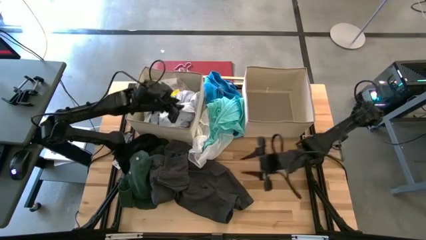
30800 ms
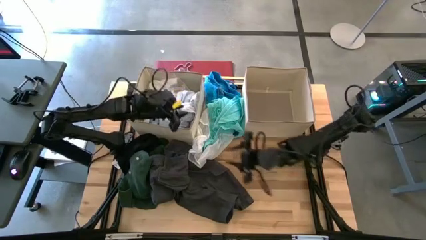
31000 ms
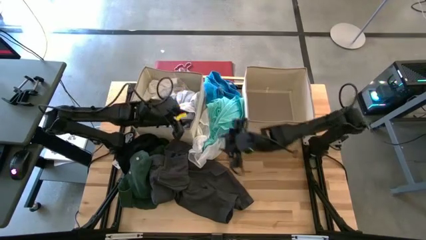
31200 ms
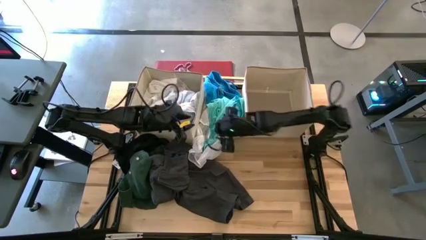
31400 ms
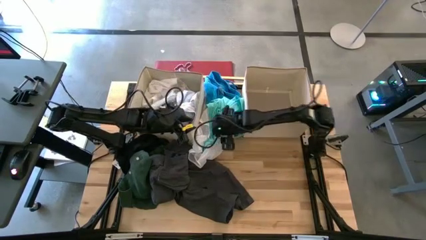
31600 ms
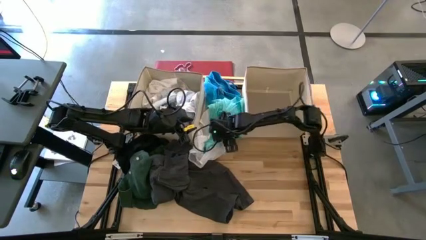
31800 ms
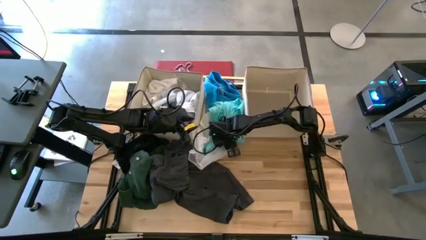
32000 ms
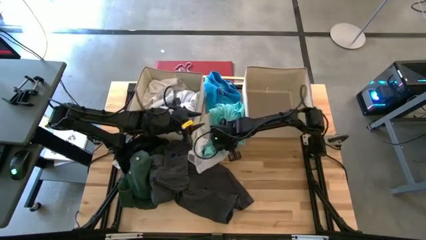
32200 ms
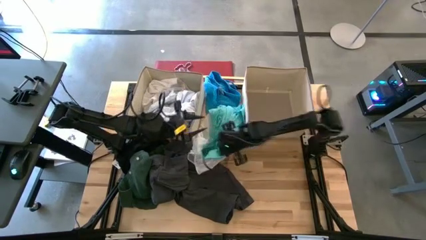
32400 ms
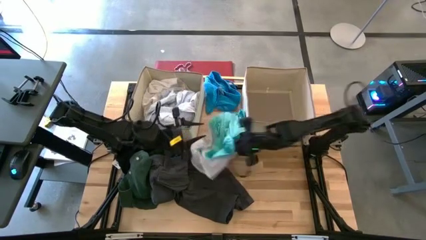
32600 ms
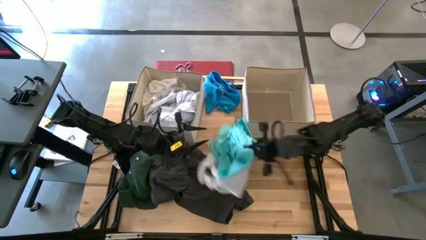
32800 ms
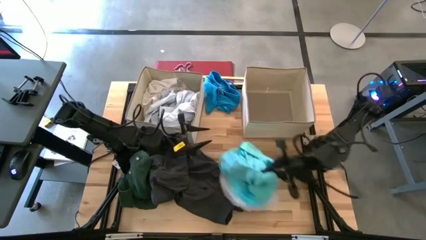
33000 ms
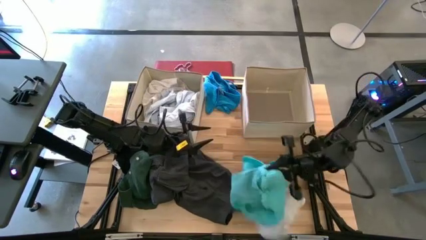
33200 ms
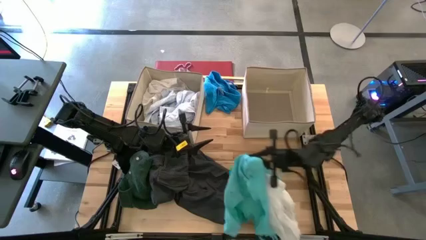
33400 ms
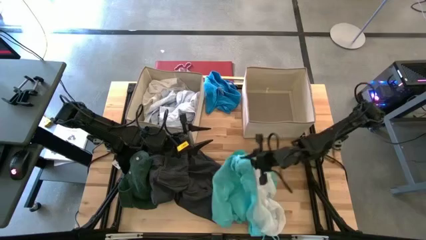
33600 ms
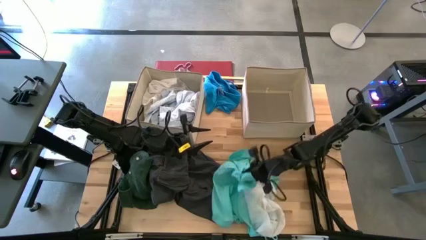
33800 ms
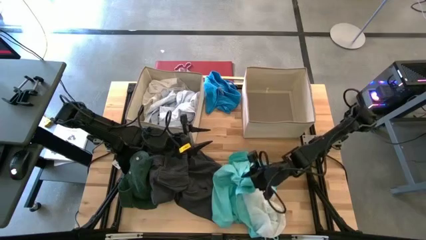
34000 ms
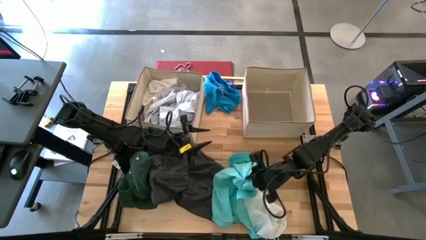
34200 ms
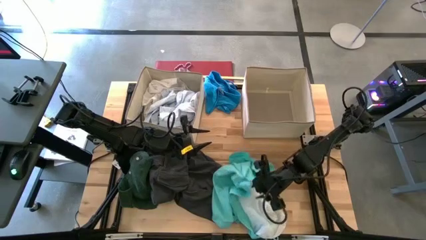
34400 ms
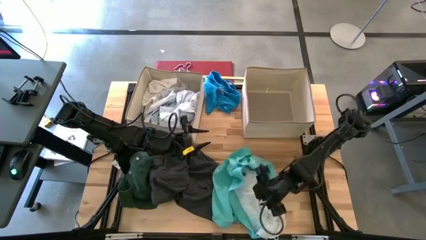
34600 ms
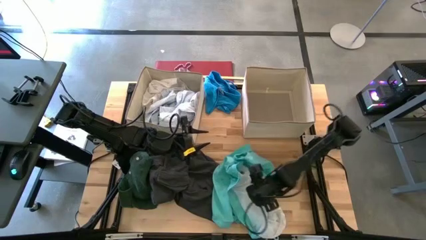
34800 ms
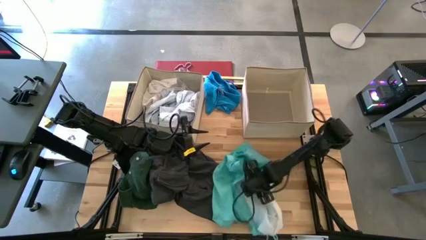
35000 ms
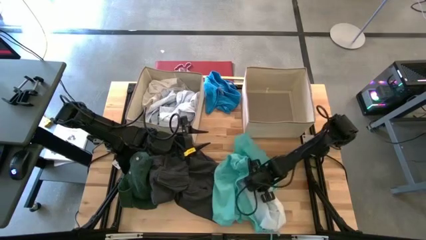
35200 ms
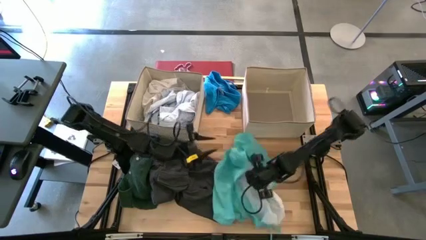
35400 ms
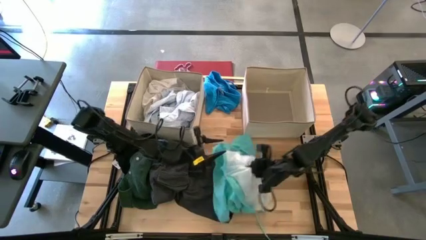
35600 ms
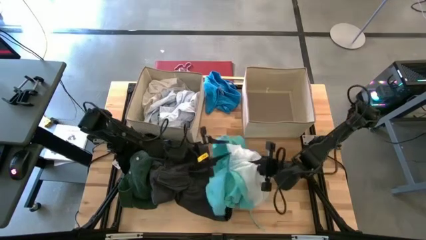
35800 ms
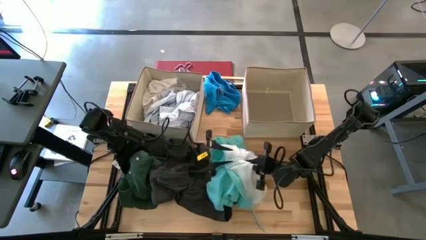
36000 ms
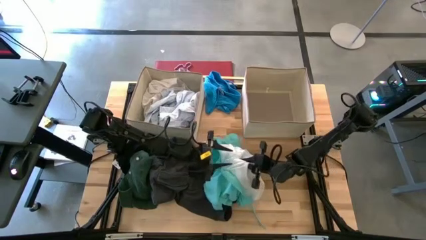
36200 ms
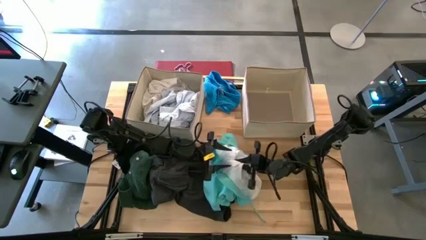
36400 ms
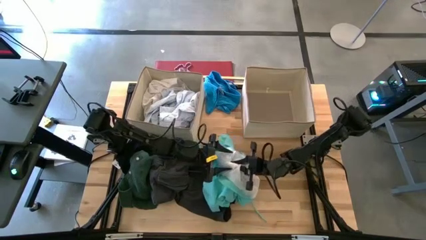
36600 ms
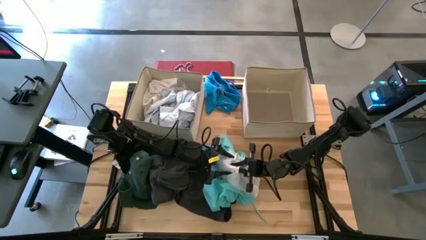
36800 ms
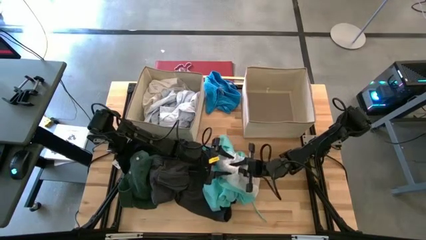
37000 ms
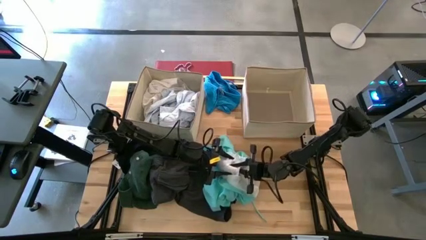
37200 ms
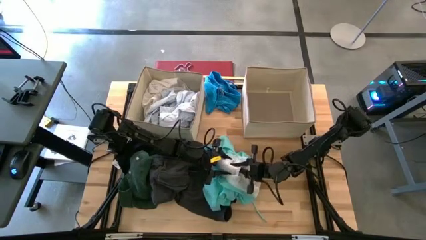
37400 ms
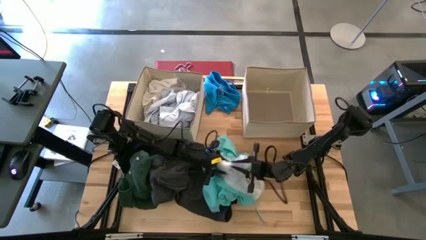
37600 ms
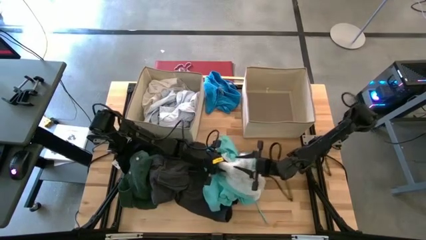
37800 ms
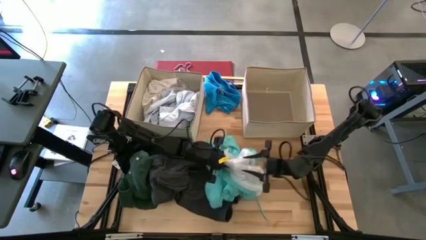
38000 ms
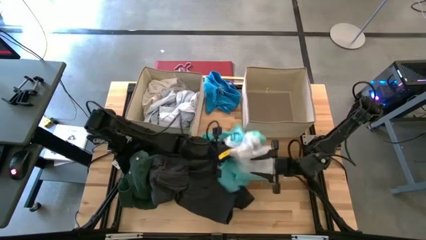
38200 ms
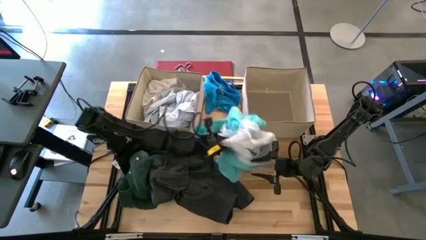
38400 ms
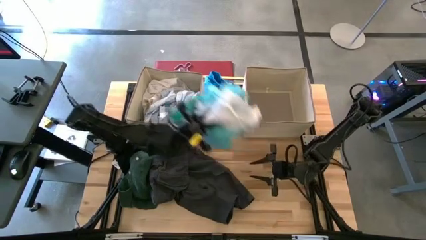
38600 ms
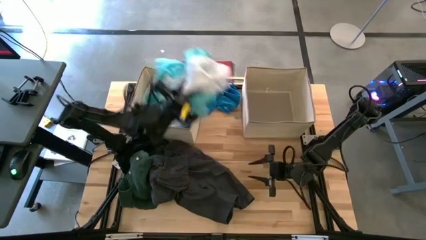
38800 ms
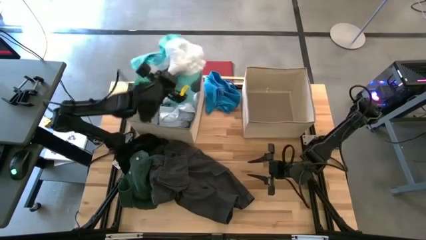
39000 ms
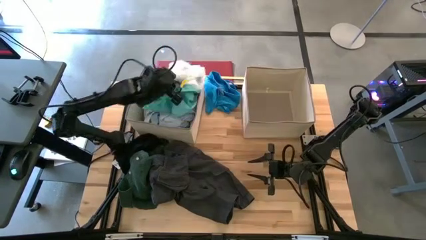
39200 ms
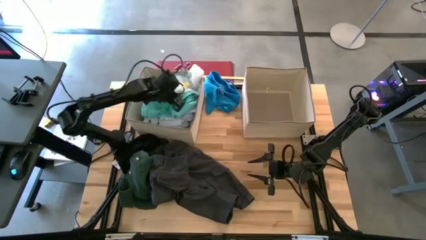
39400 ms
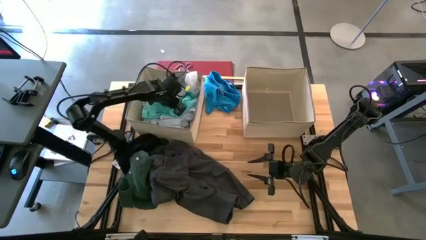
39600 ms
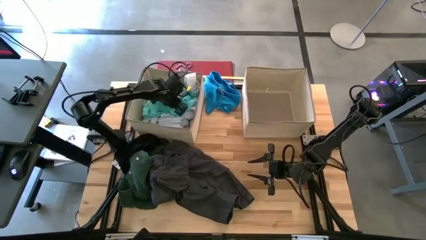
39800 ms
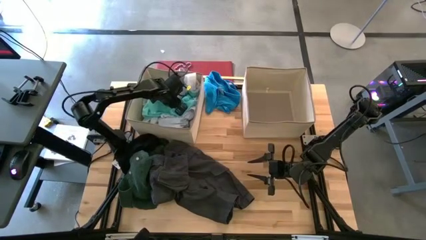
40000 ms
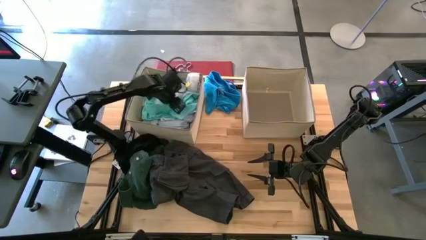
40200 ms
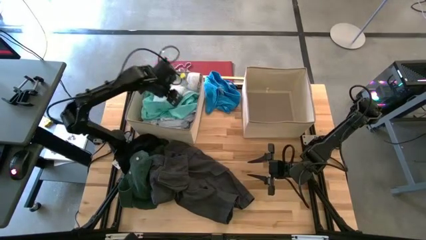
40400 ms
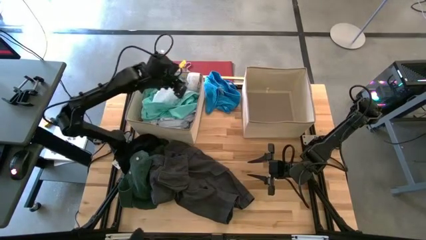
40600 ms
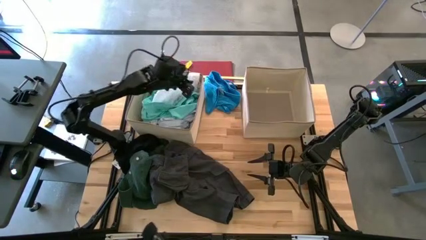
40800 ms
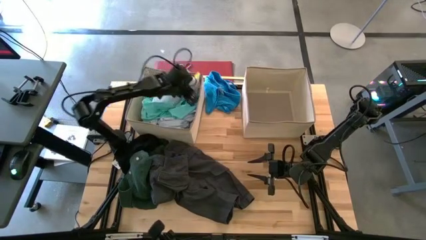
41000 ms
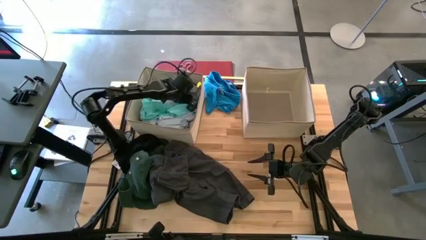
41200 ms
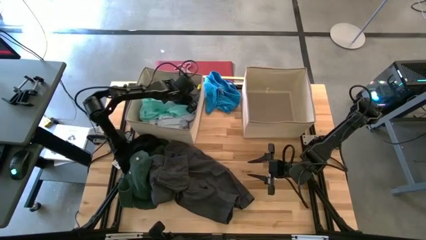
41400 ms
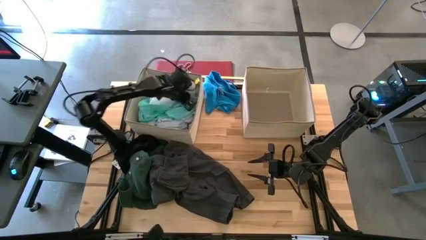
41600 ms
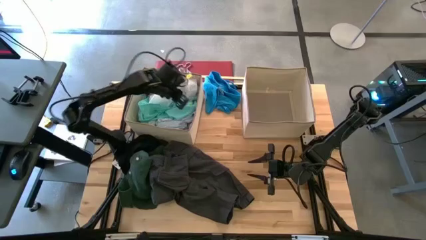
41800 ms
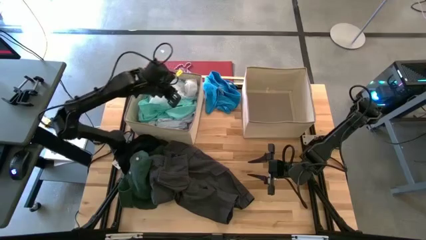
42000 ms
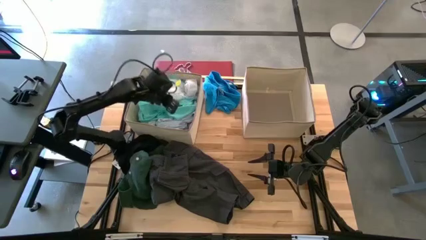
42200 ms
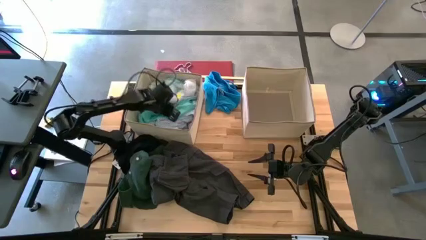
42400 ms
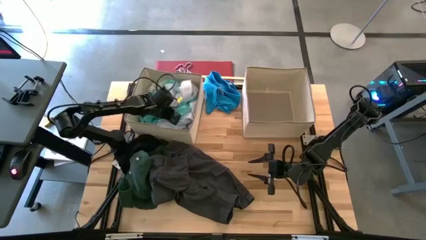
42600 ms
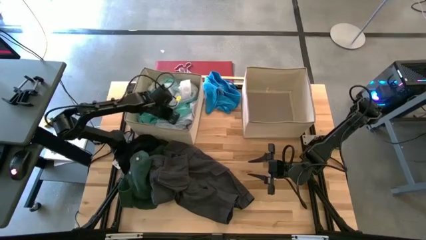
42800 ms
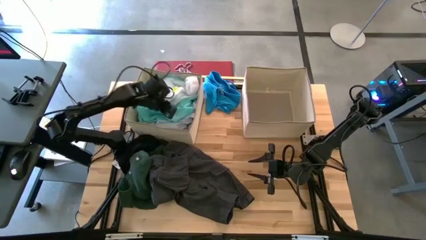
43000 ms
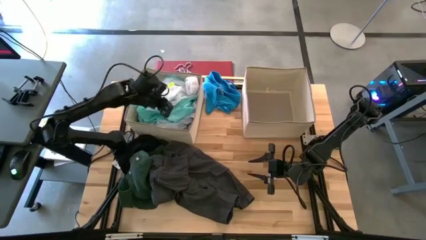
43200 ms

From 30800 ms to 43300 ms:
Task: Sort clothes
Put the light blue shorts into the left laundry organizer

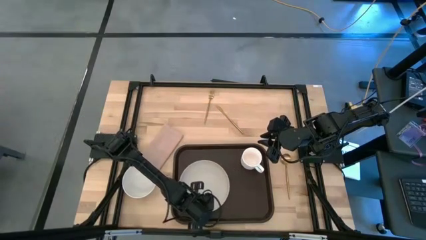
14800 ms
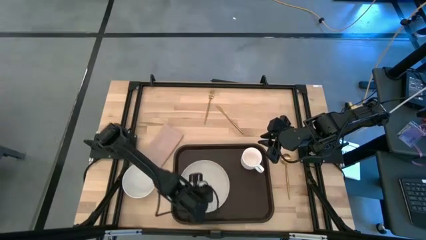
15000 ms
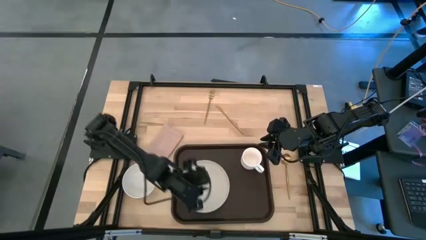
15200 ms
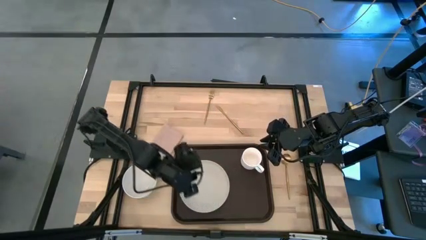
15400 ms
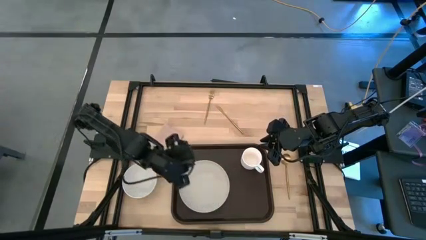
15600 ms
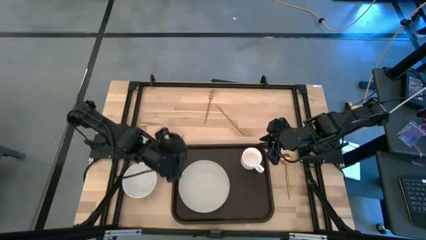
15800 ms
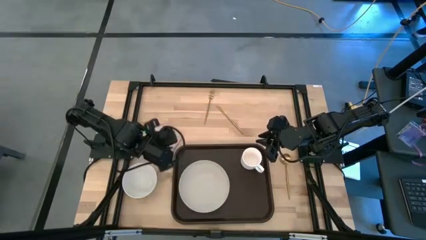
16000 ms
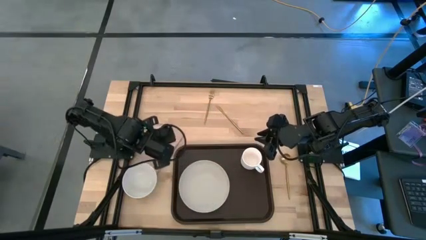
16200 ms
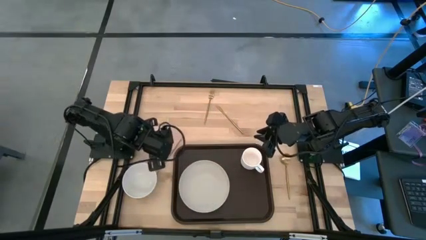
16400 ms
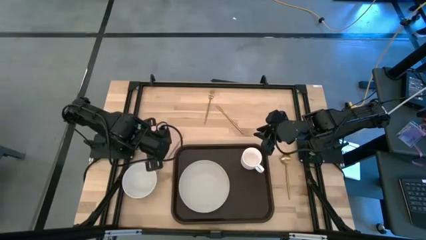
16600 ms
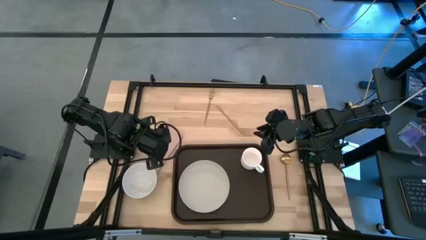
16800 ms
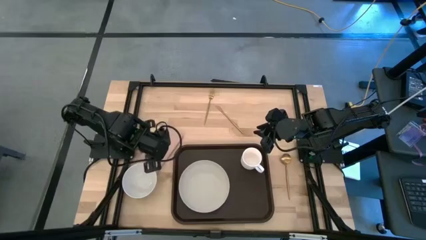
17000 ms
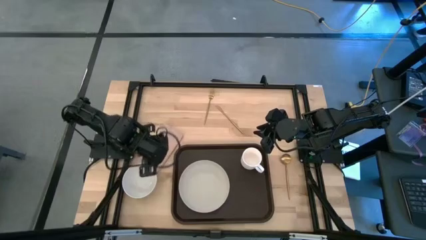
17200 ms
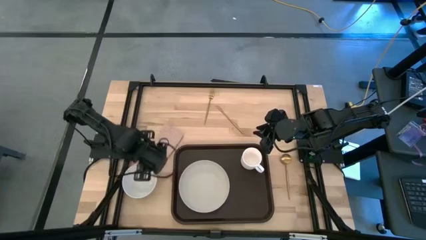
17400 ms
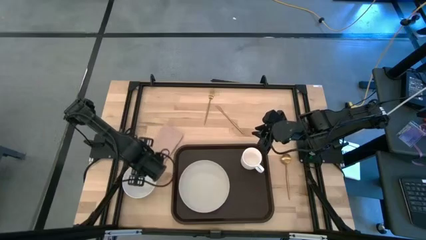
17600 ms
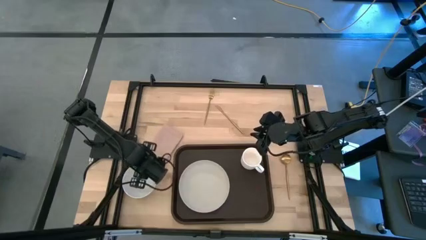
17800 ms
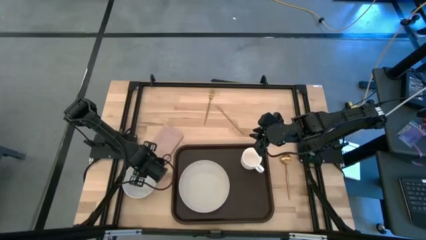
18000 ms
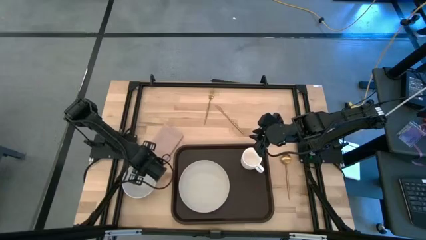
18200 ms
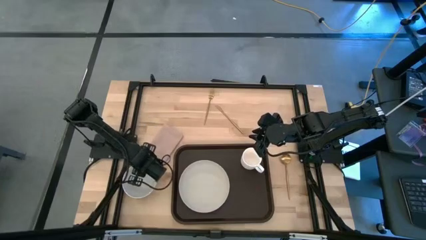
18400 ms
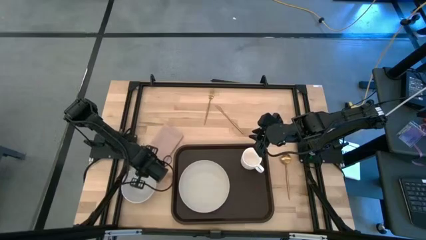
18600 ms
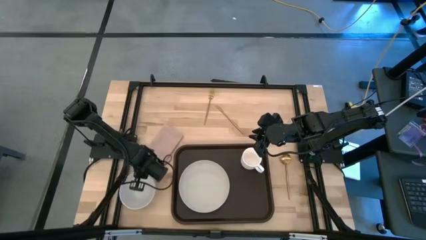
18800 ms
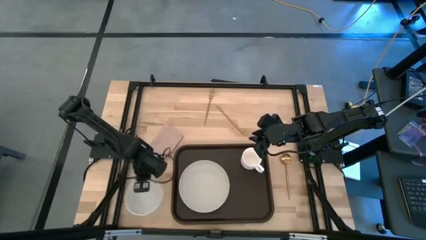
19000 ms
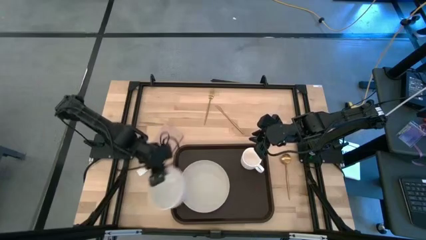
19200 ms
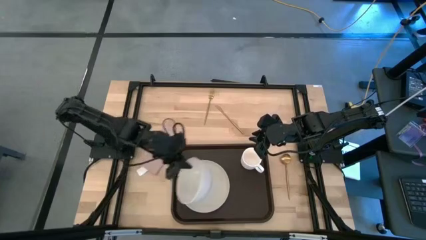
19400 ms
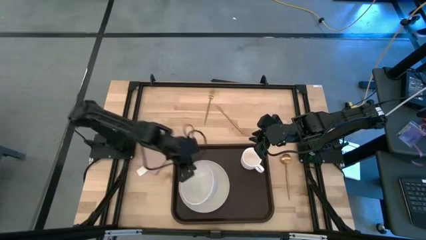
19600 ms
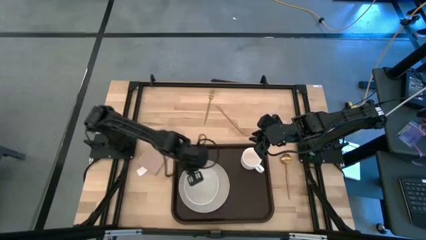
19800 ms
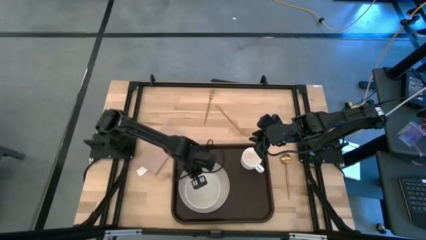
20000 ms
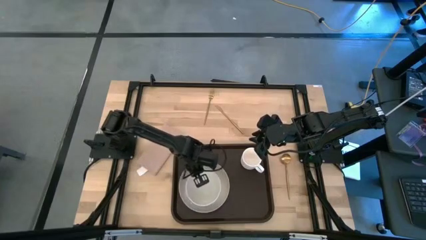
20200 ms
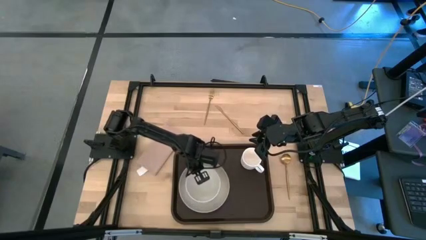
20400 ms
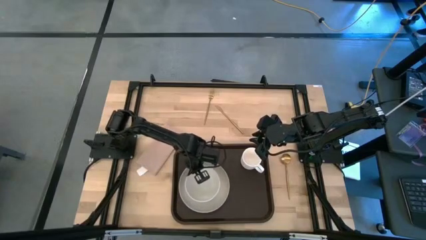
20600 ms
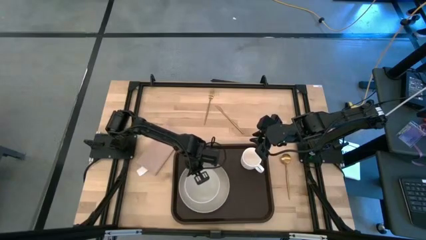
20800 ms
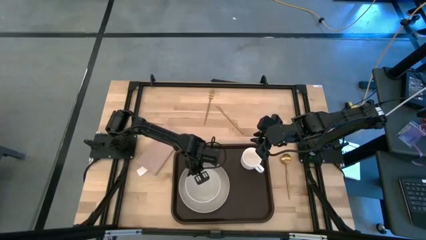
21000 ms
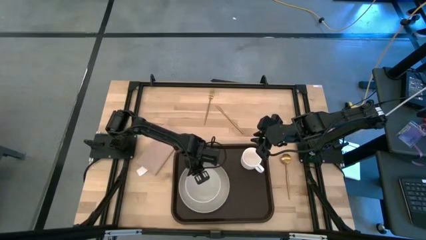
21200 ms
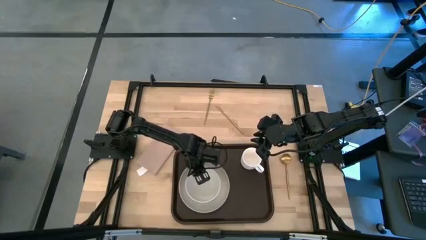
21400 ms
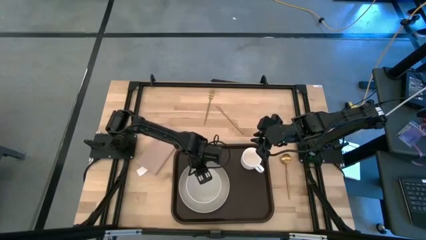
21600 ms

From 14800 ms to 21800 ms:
Task: Set up tray
Put the white bowl on the gray plate on the black serving tray
